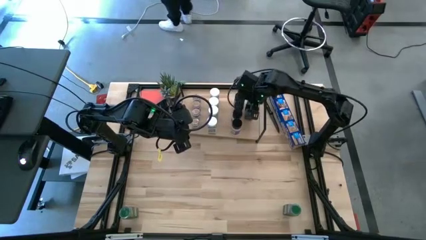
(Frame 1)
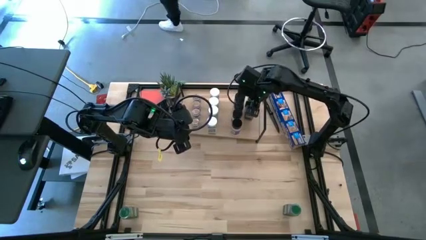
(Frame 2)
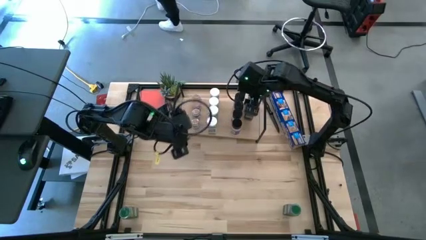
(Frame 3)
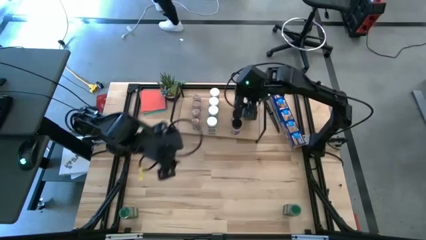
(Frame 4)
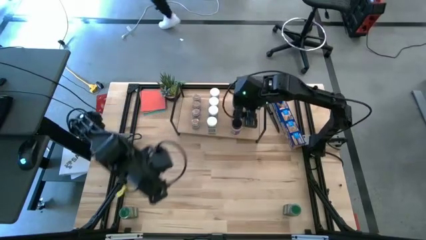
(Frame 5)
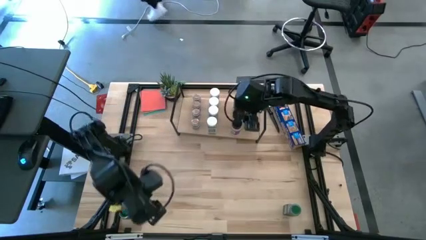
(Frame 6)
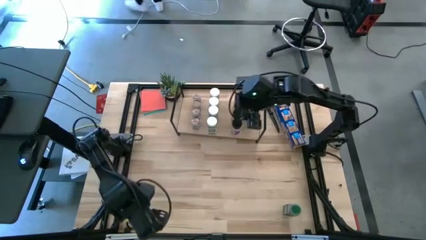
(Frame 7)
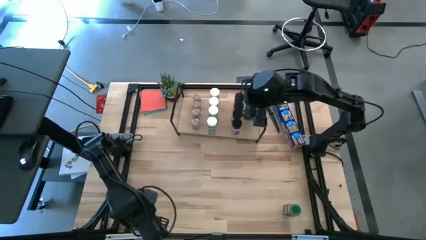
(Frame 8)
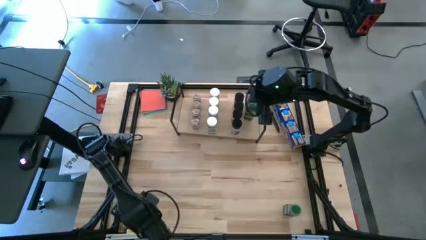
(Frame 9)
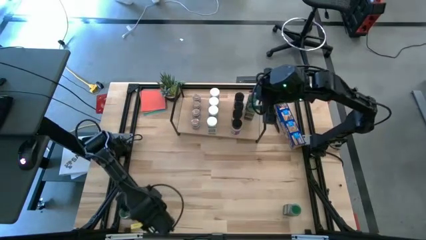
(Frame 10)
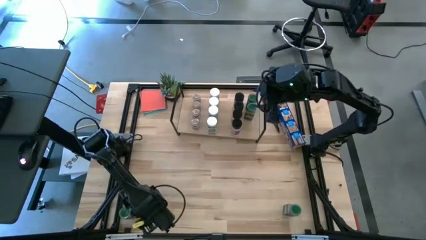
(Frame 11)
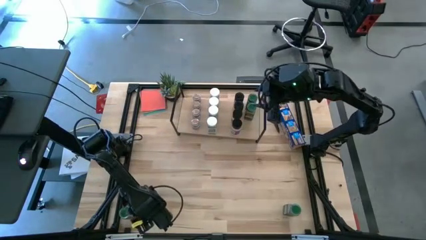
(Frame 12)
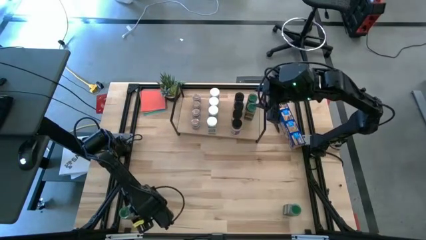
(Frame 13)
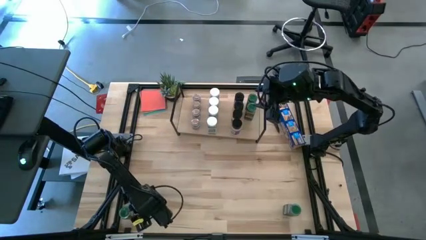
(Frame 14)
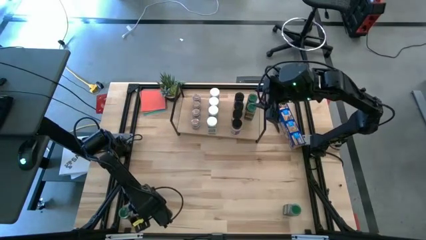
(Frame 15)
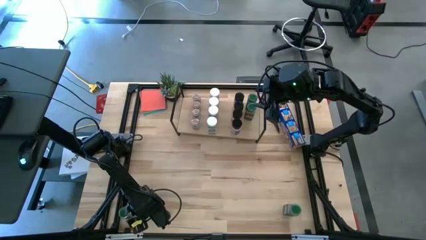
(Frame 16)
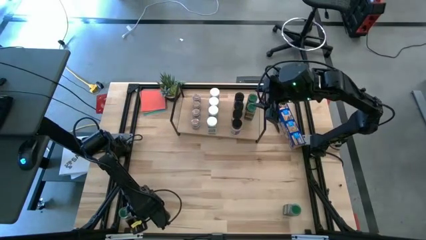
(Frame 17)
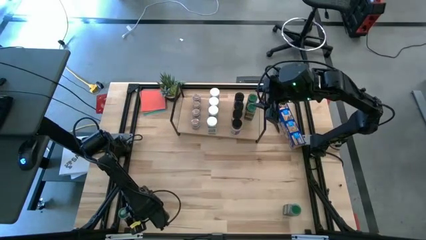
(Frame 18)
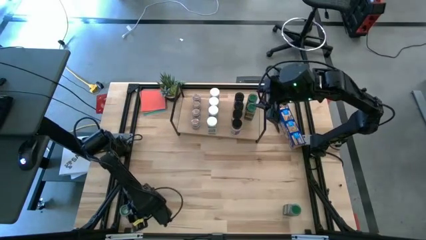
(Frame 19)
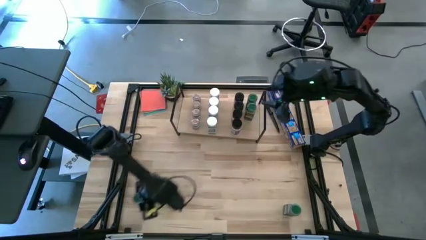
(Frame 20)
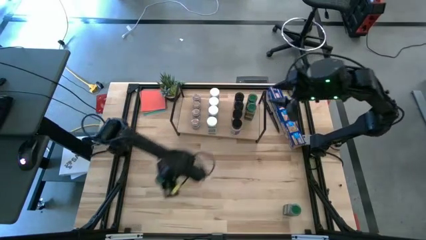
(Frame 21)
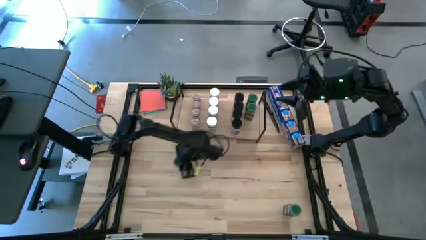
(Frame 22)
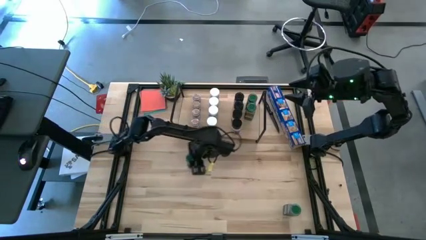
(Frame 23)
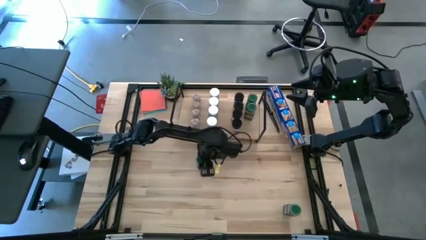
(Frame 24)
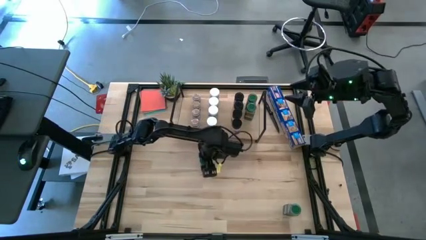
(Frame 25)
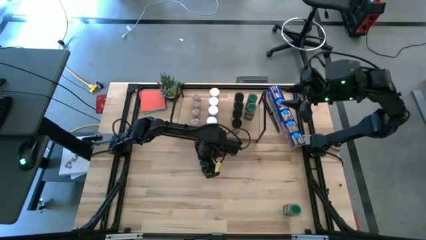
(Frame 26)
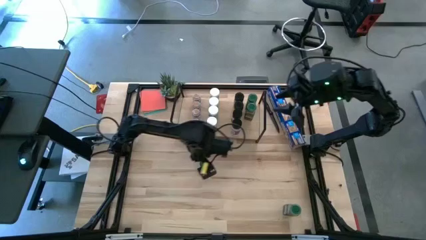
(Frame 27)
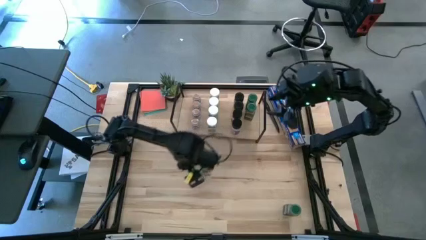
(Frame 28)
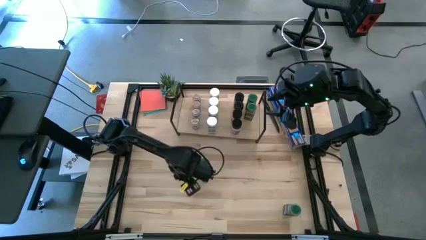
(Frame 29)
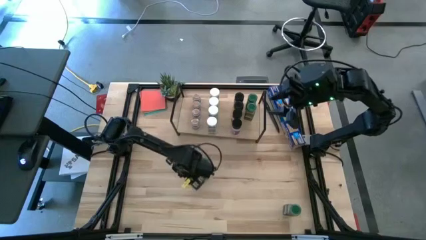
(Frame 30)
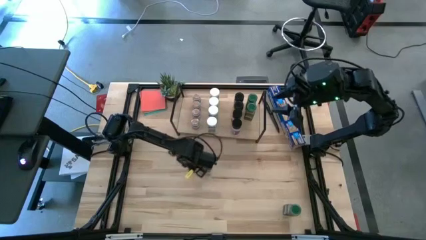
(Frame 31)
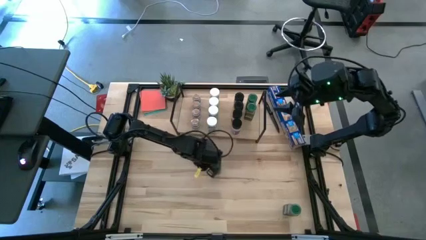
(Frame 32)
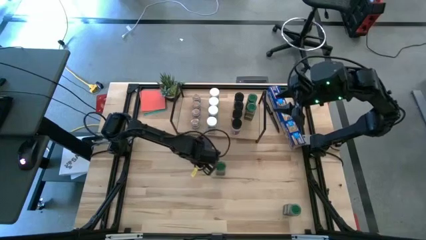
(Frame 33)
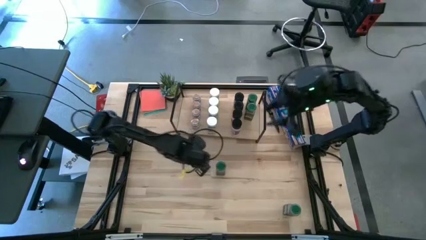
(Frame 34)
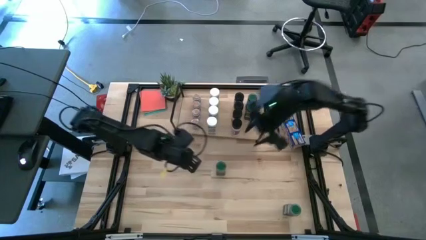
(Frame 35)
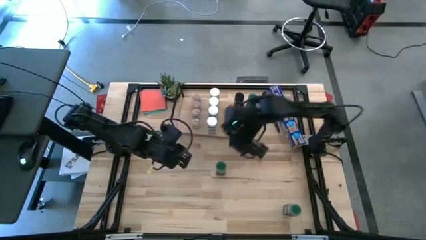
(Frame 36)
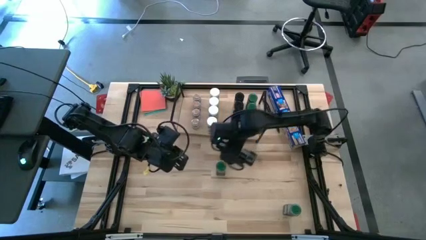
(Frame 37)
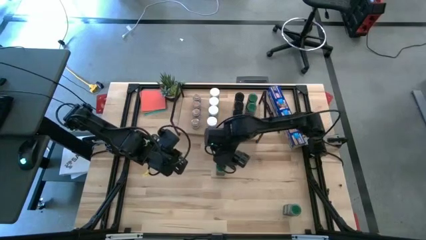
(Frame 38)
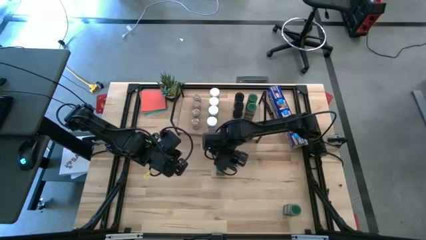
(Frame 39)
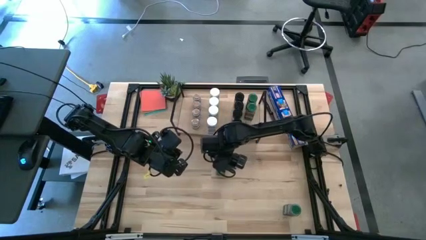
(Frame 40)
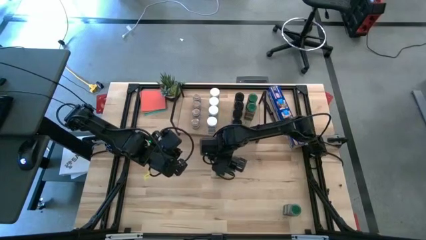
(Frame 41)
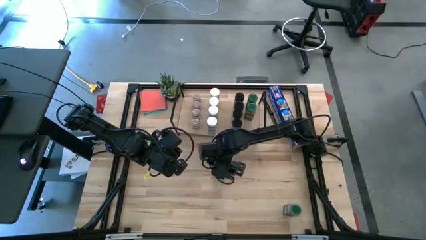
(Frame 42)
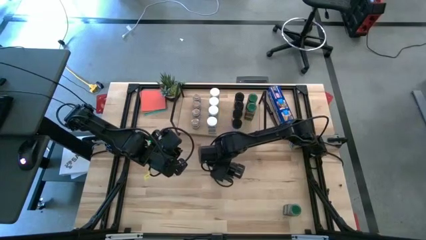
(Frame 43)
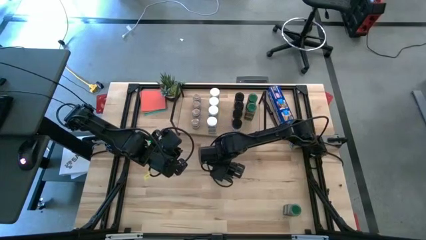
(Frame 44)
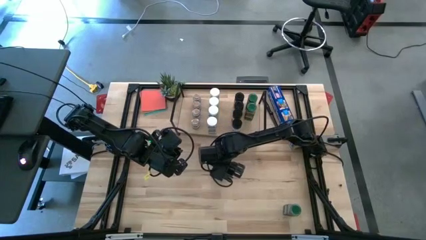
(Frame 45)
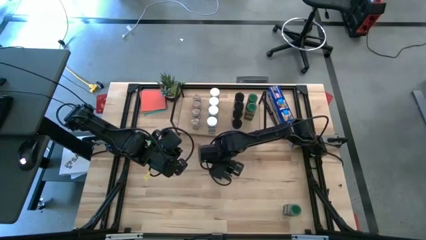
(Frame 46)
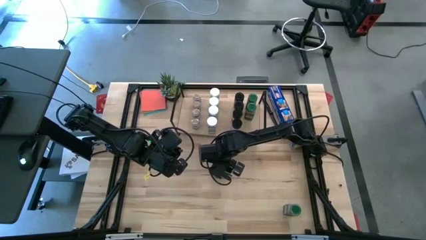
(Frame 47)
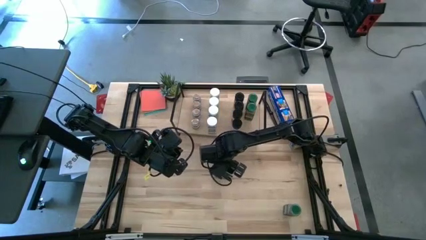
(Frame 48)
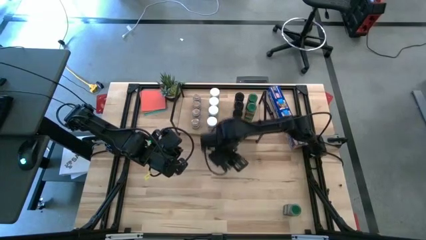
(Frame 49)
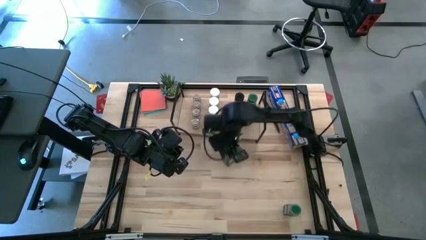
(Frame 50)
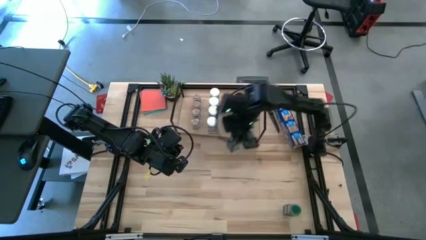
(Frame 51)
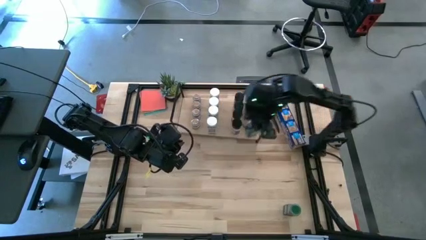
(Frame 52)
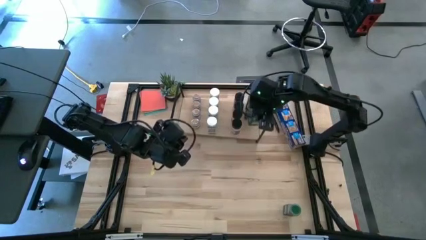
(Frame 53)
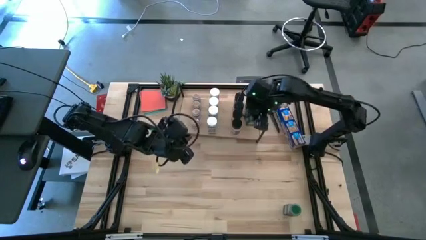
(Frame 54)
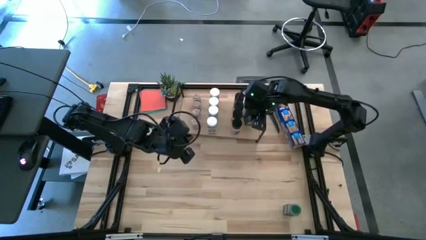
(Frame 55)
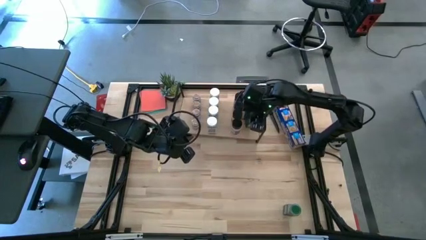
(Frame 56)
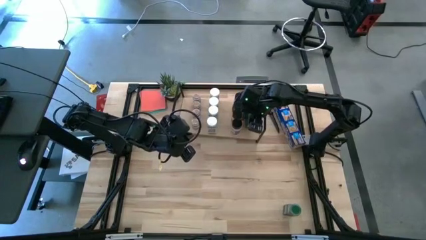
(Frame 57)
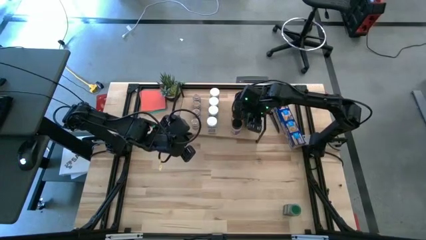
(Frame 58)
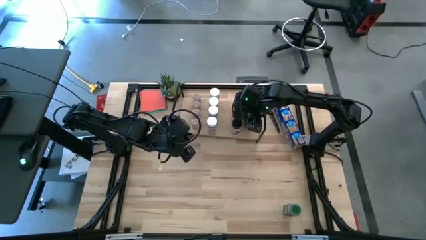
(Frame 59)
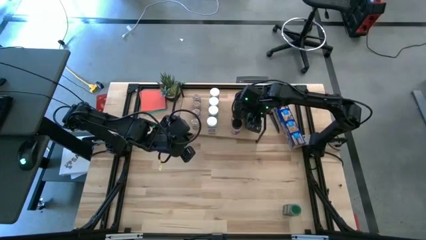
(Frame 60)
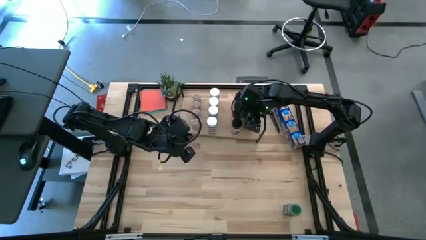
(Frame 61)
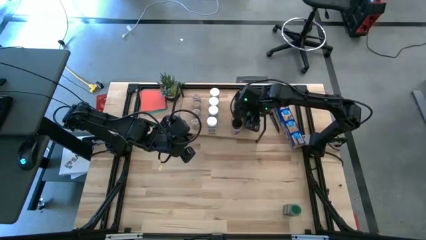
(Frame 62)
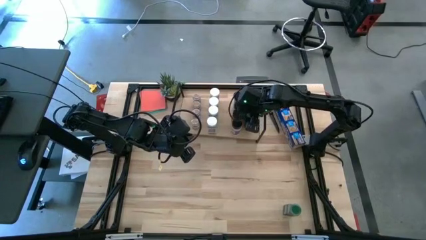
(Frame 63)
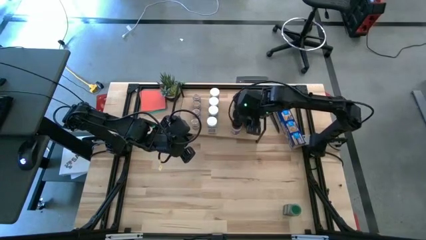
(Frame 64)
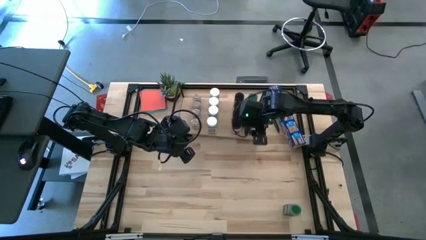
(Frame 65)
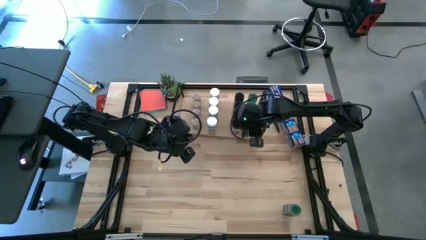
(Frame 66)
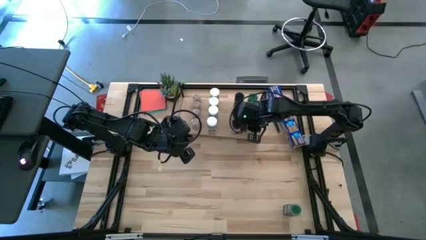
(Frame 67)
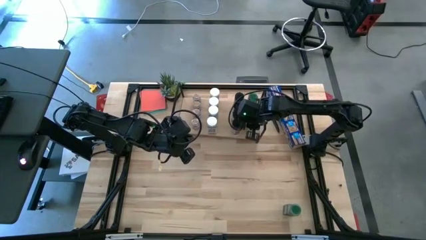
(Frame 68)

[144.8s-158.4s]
Task: Shelf spices
Put the green seasoning bottle on the shelf aligned with the other green seasoning bottles

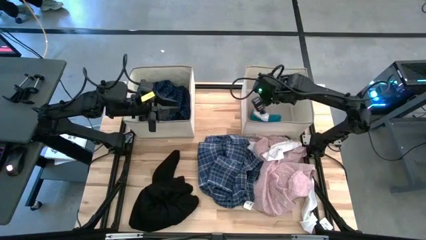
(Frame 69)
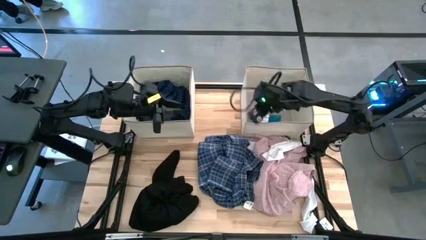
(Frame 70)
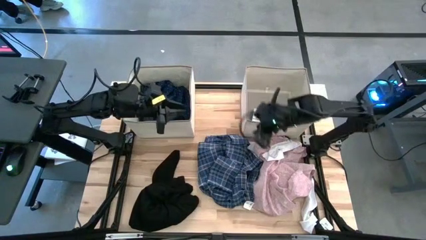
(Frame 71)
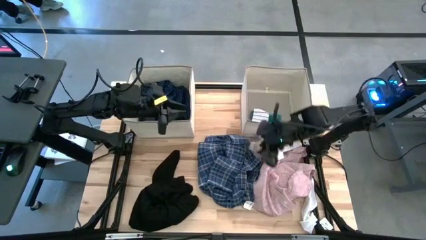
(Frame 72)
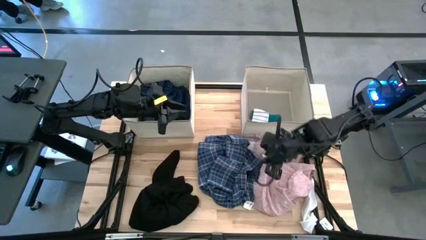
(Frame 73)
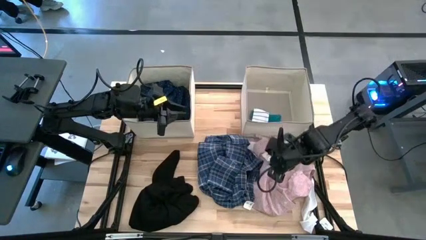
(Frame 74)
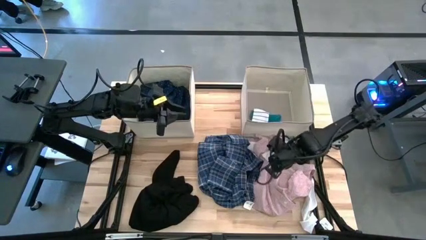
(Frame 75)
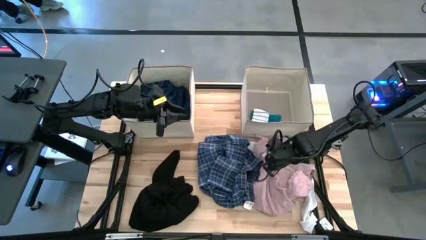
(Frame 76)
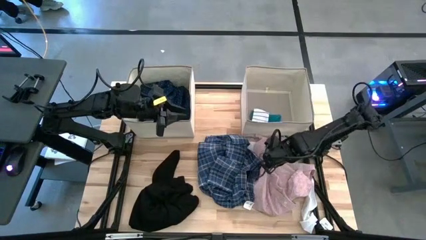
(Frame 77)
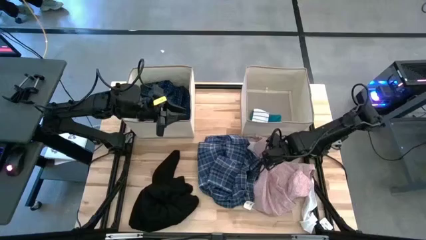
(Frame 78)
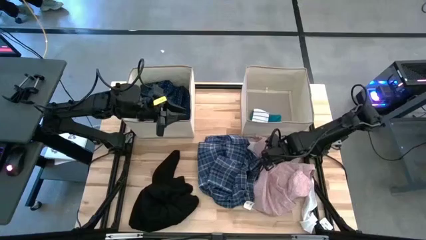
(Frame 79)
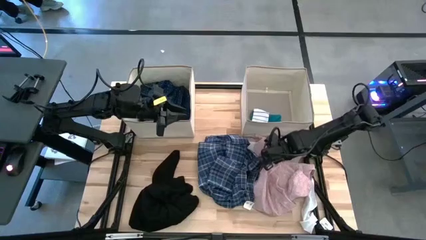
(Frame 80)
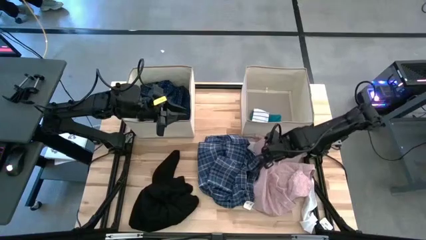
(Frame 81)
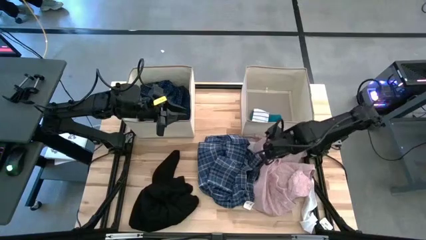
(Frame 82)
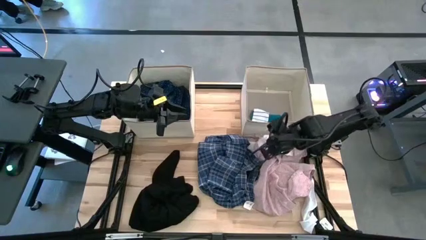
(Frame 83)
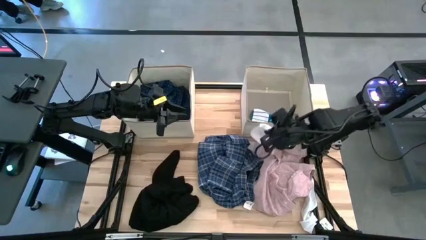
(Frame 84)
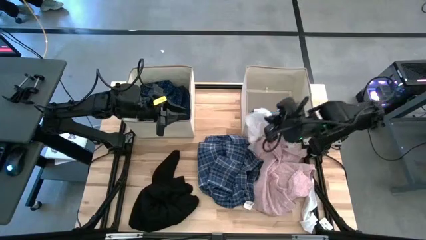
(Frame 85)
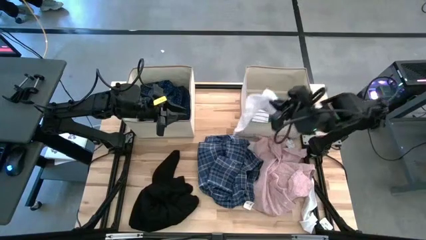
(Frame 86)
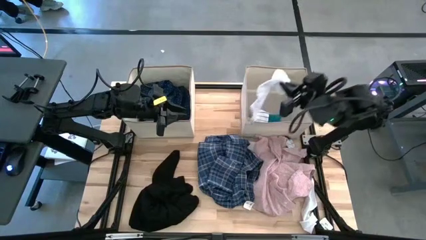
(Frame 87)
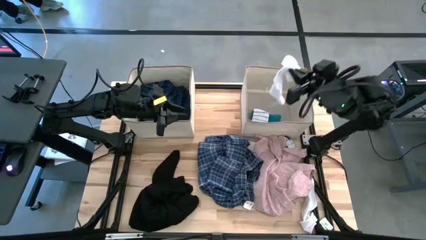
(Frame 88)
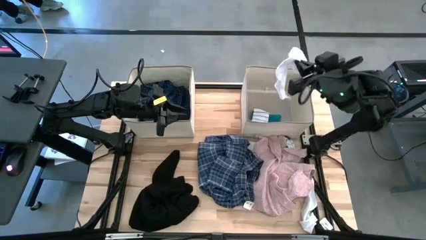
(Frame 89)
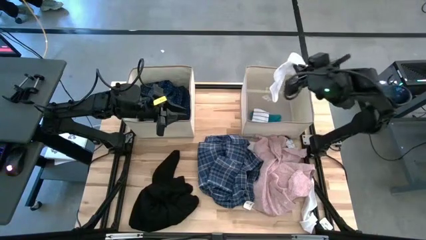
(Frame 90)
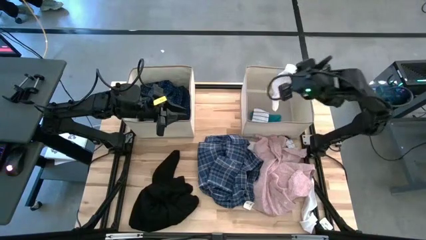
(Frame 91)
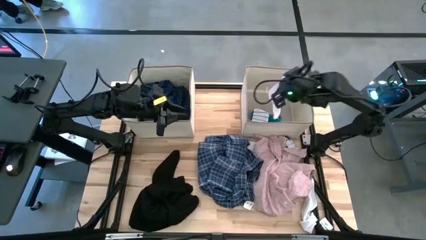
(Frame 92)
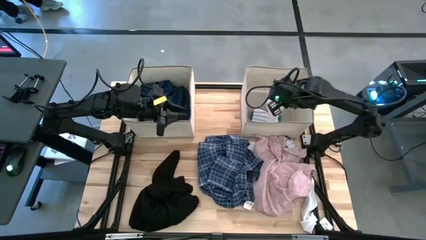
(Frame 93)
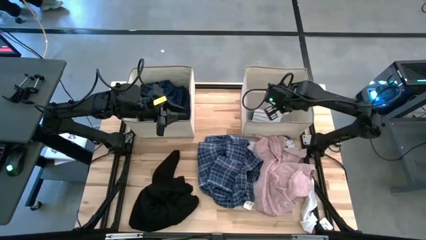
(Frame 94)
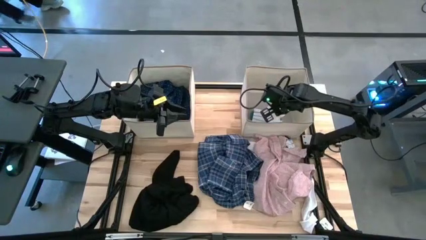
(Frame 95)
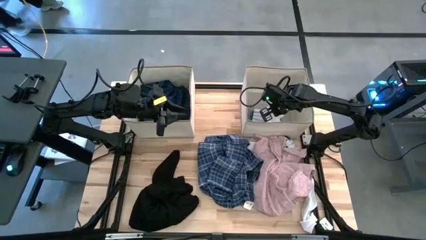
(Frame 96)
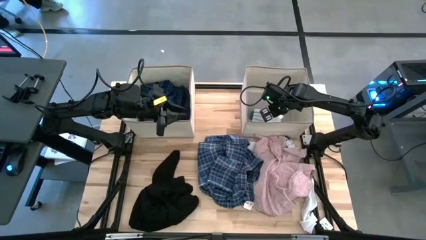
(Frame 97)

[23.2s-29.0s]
Task: Sort clothes
Put the white sock into the right laundry bin
